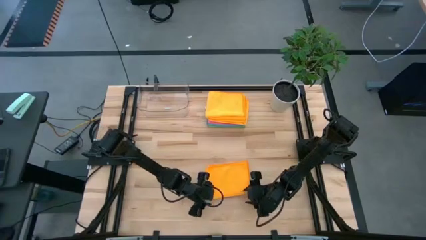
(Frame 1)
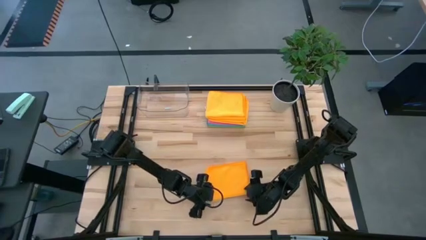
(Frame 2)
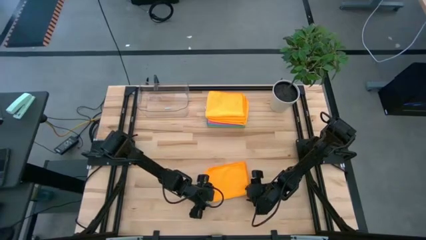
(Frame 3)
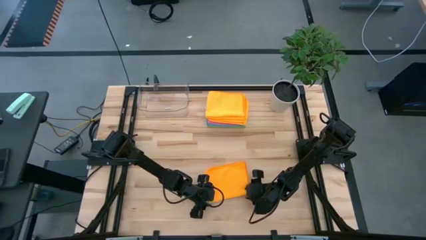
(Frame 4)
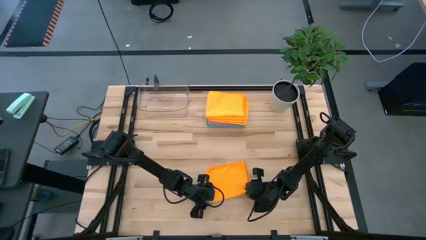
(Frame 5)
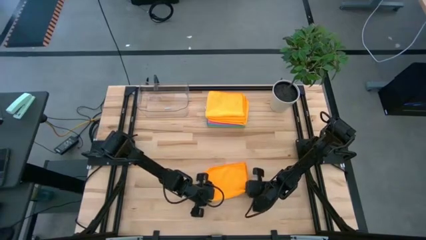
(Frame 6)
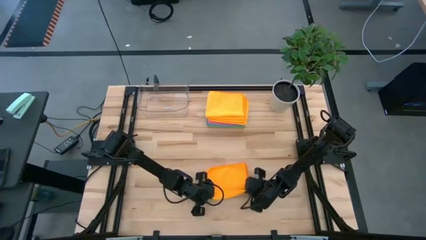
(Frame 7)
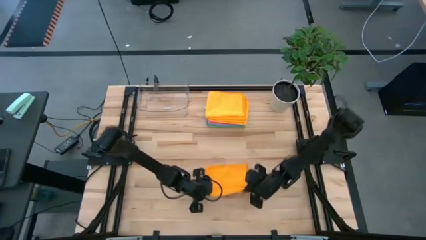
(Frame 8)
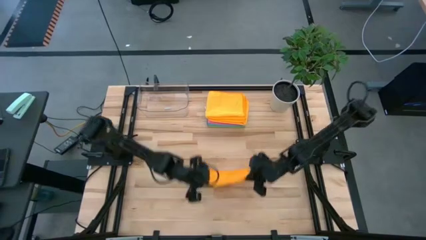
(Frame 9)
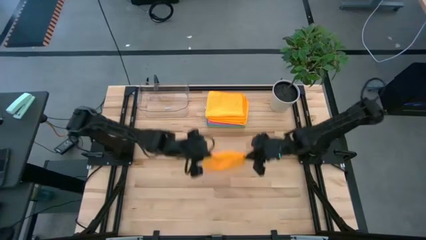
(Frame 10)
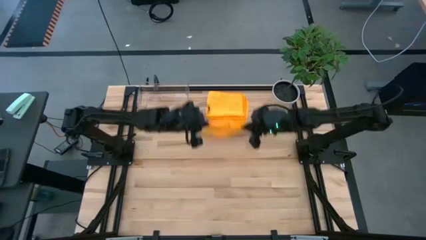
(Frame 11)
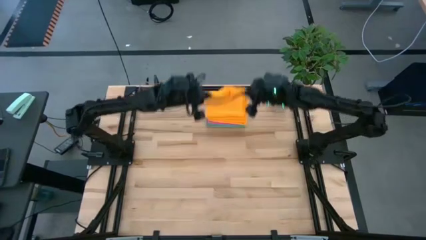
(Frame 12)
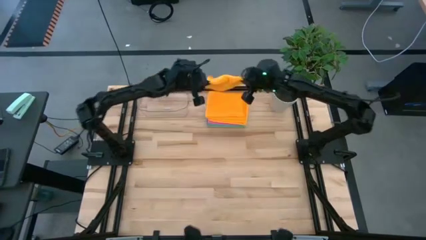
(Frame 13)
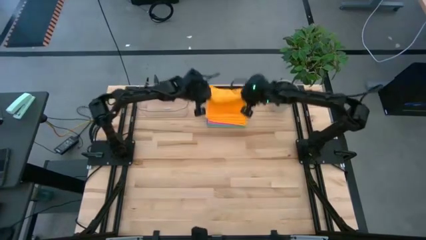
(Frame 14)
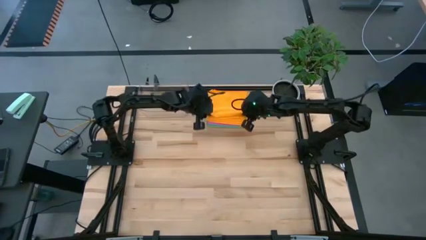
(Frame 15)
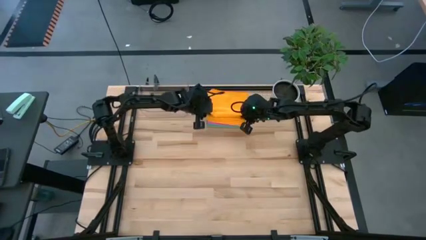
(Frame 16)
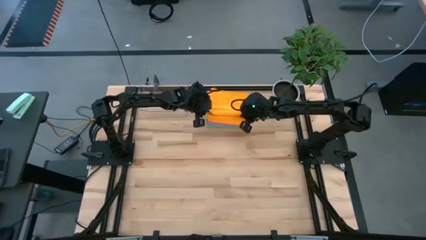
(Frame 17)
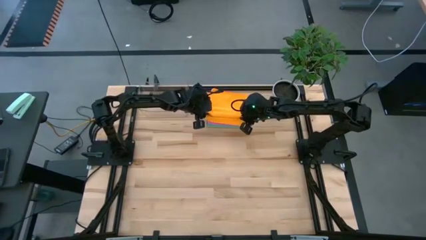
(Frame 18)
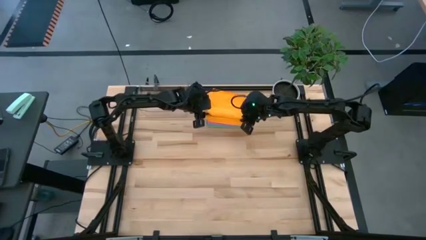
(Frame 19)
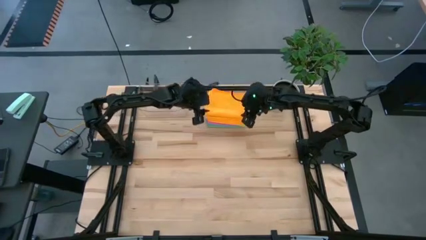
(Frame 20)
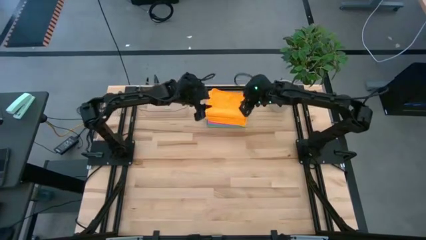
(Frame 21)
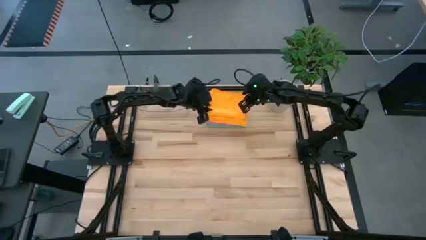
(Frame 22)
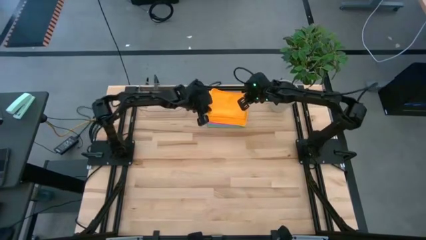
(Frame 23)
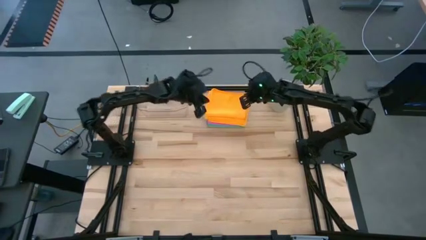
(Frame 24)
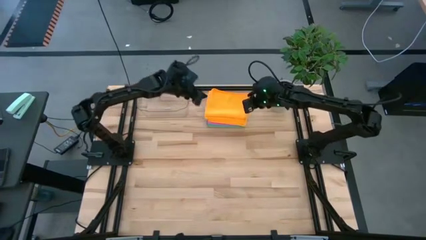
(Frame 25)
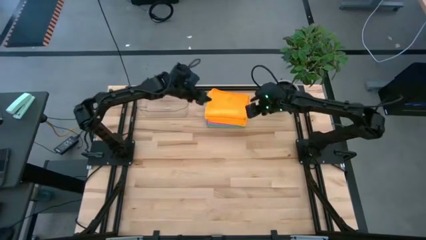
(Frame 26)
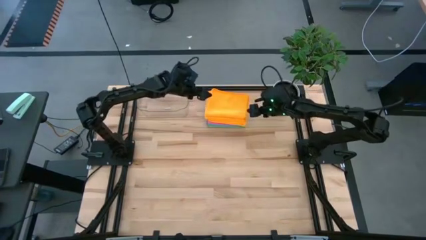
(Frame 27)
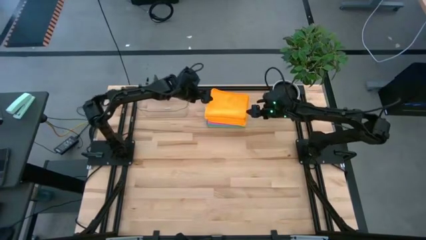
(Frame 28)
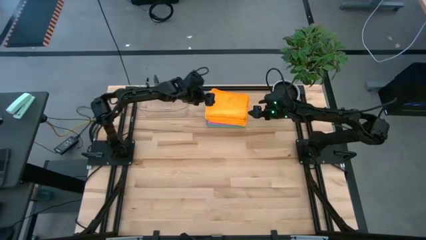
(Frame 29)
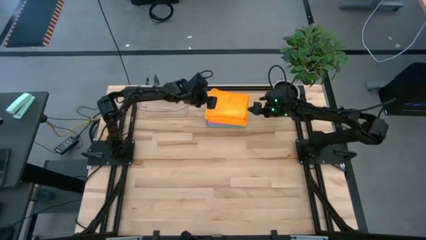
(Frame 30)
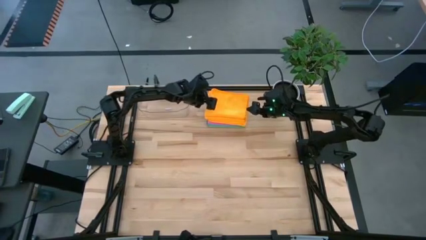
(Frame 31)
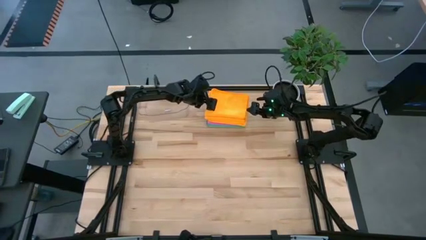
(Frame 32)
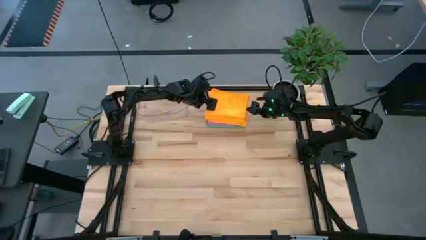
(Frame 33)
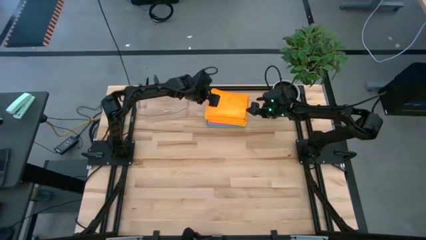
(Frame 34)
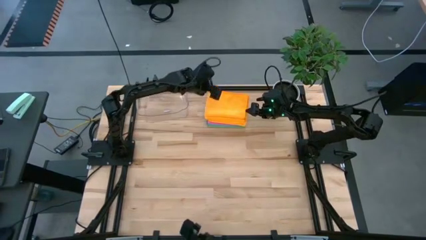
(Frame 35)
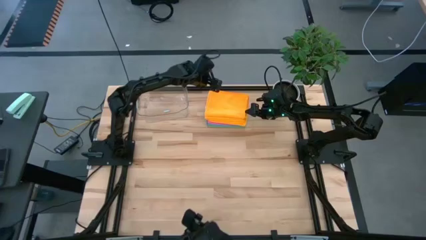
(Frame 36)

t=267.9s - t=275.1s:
Task: Fold microfiber towels
Stack the folded orange towel on the folded orange towel

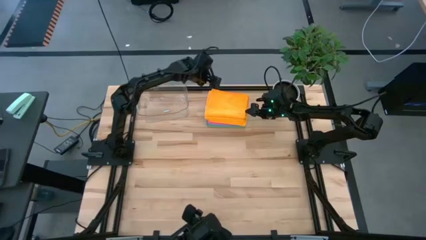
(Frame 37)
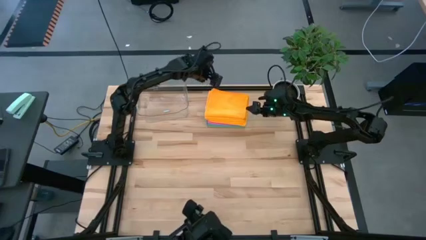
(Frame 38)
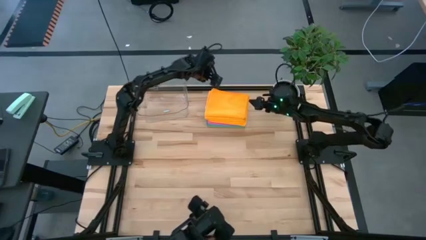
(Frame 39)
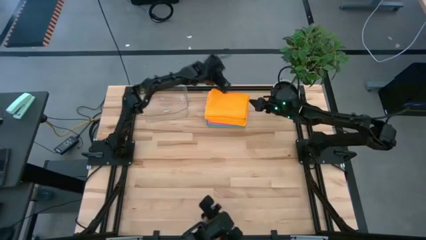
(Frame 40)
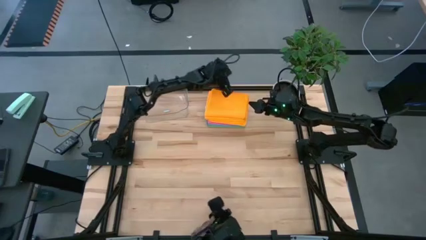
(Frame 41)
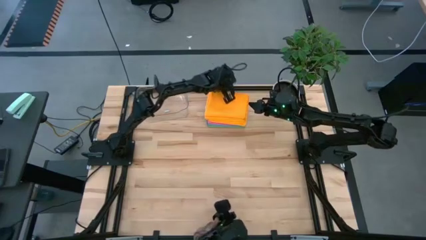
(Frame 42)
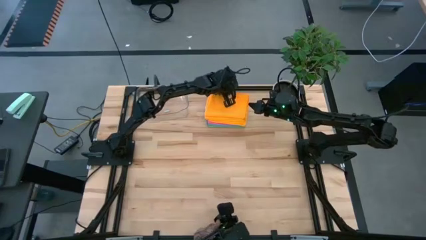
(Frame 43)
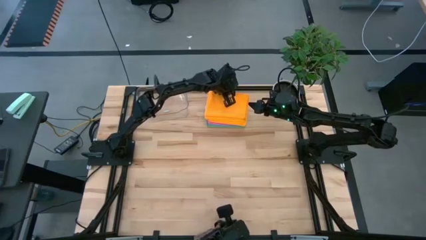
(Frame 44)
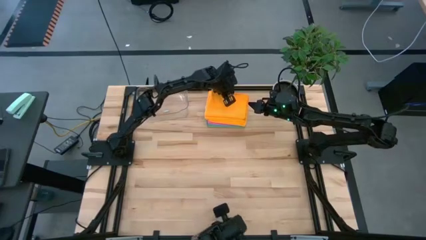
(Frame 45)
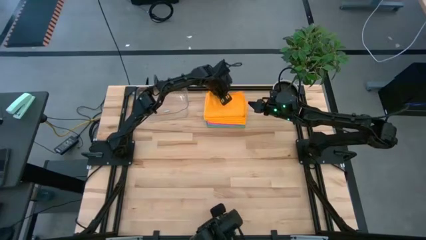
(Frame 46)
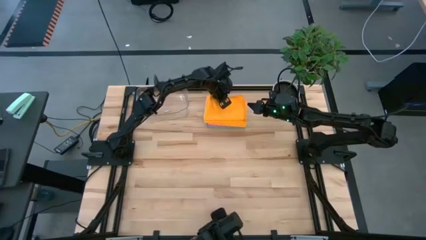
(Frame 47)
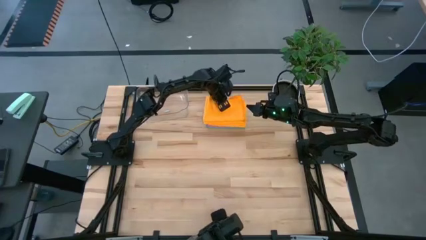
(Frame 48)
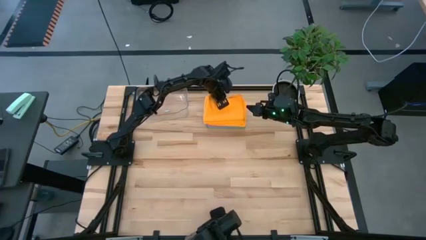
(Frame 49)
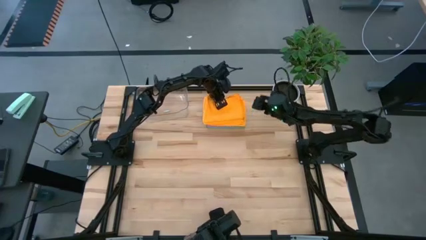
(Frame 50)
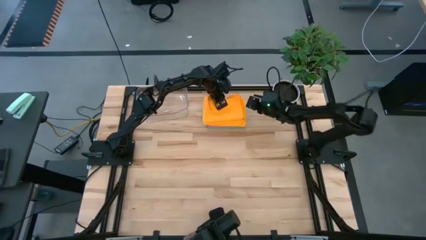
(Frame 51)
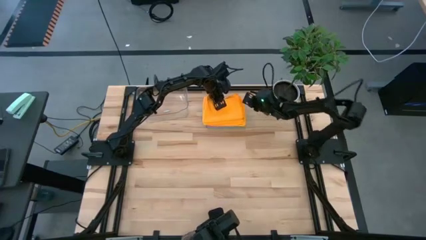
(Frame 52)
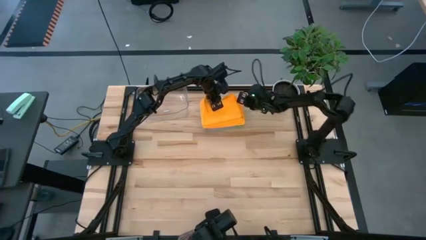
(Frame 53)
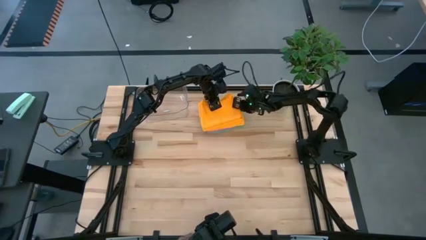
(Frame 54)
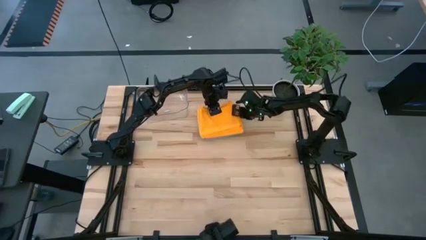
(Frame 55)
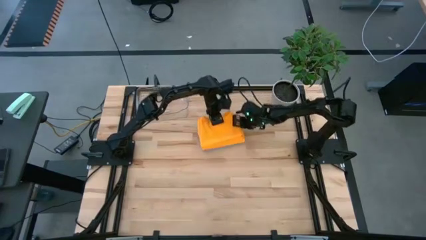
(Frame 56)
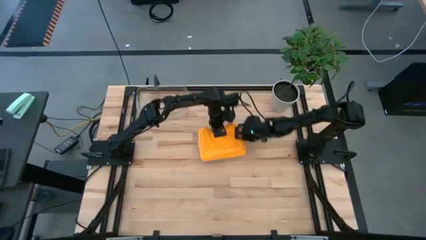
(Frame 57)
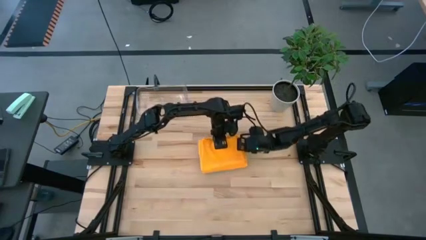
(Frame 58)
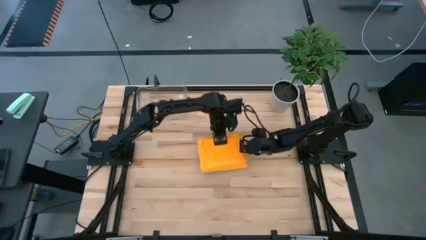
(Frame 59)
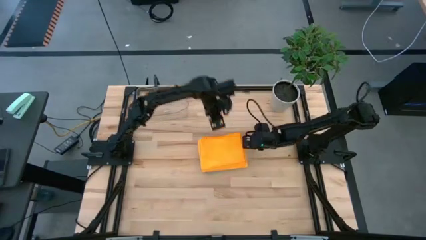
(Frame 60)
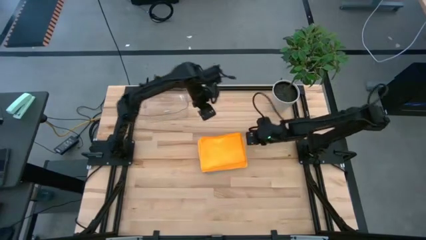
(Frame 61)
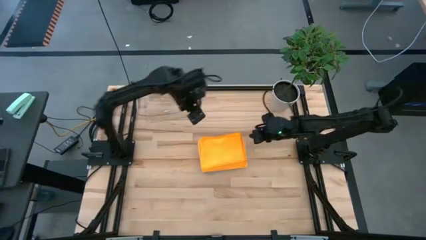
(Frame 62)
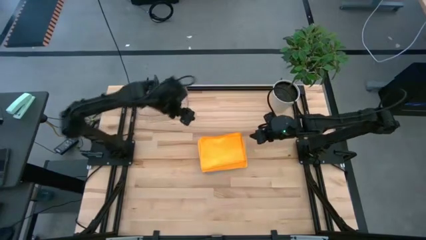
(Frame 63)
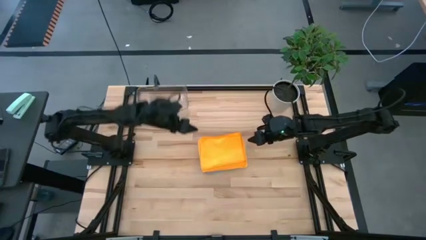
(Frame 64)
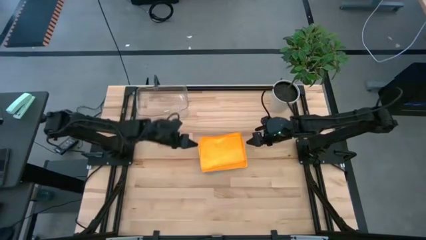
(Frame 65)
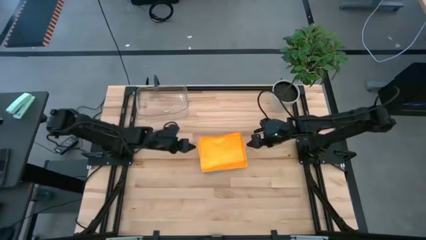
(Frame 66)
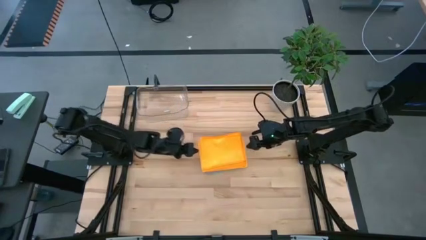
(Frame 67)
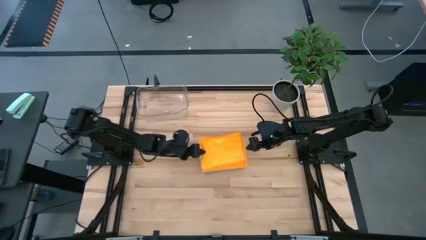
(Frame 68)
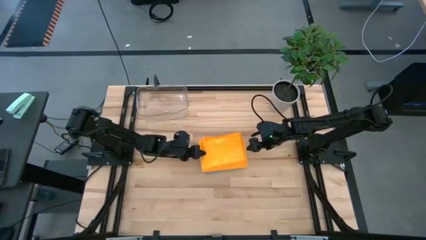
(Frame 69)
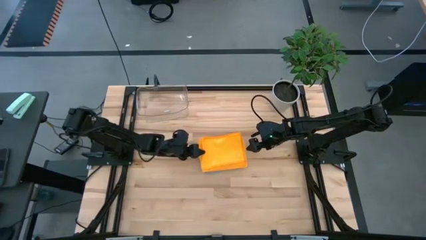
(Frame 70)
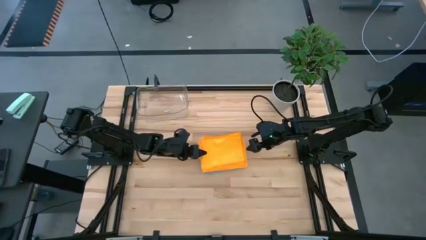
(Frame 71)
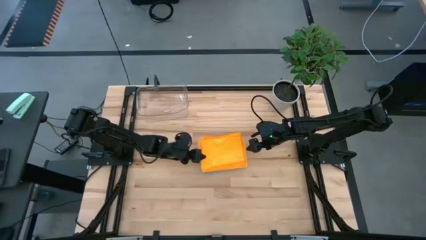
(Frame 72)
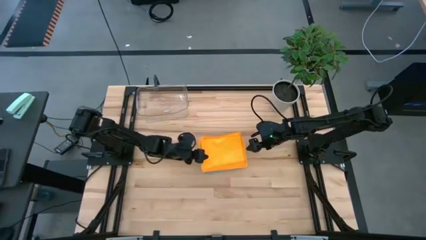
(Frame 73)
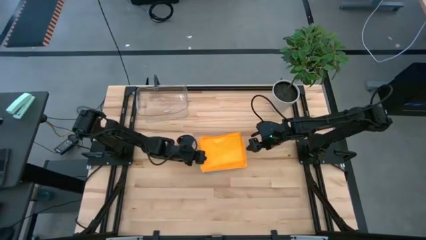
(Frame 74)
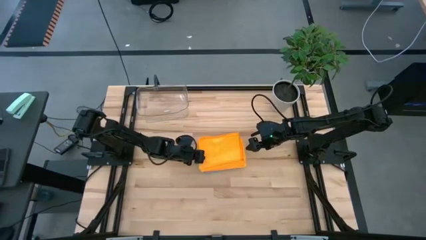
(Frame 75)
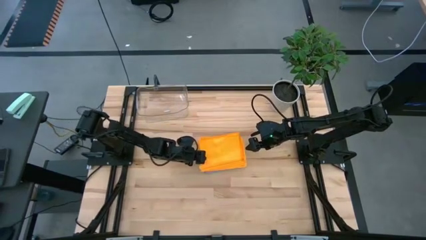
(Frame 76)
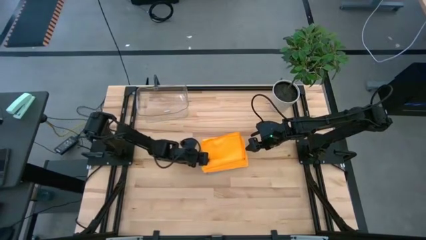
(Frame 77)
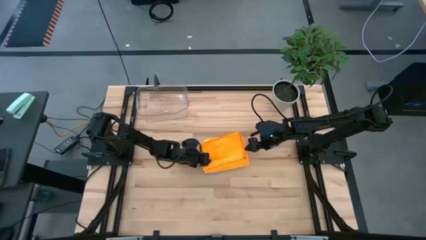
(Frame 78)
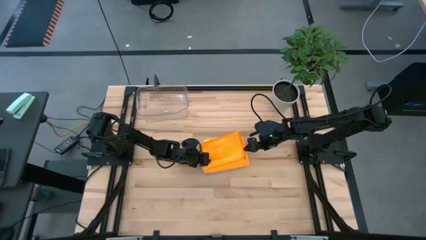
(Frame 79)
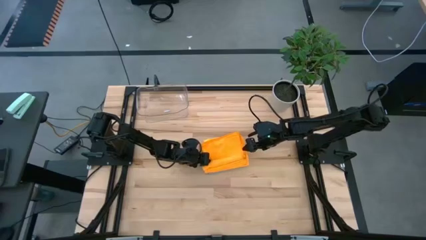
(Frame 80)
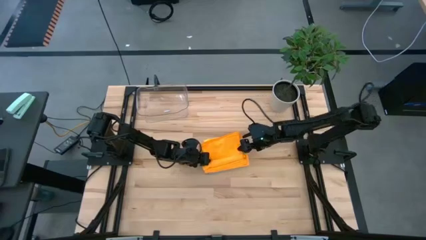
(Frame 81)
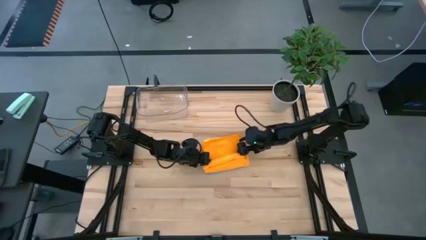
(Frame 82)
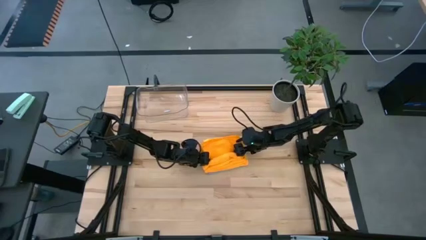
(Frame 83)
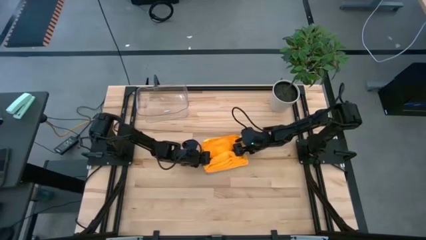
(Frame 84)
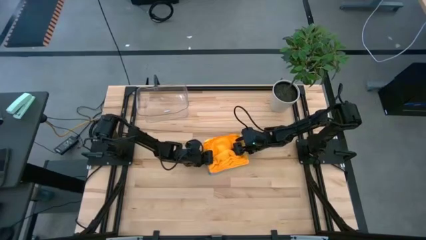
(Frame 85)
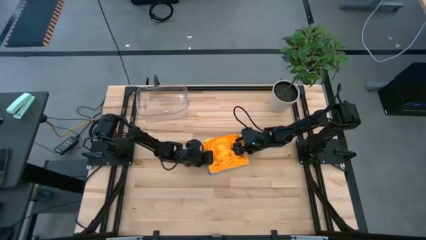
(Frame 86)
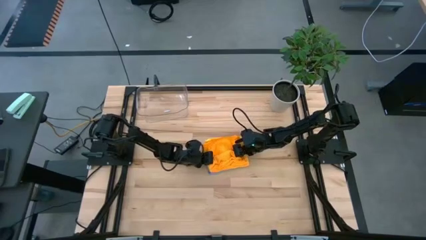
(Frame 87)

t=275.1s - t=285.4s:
Put the folded and stacked towels into the transparent bin
